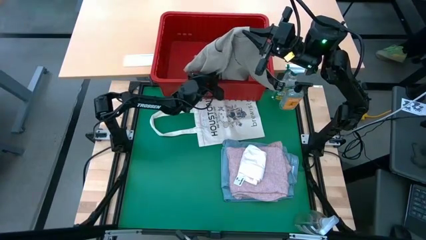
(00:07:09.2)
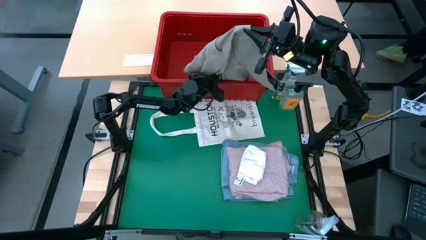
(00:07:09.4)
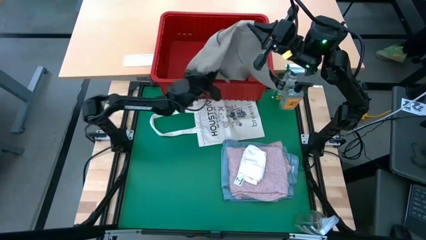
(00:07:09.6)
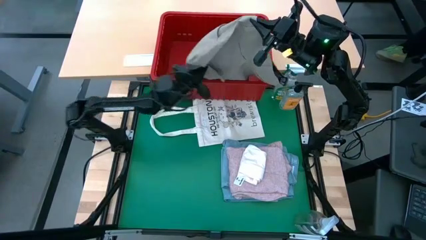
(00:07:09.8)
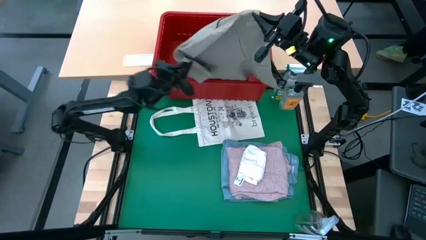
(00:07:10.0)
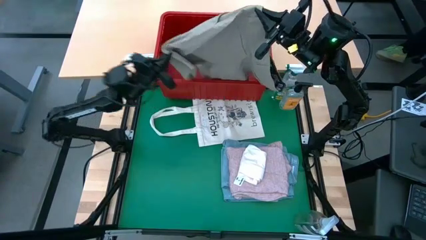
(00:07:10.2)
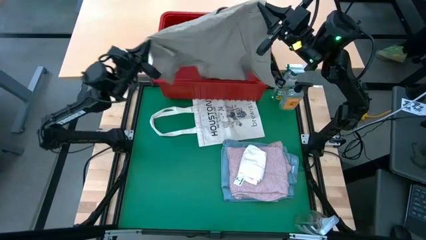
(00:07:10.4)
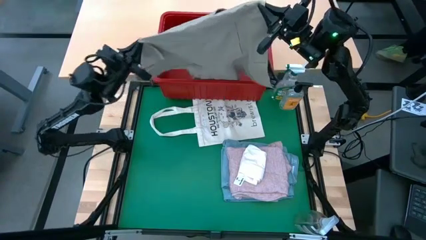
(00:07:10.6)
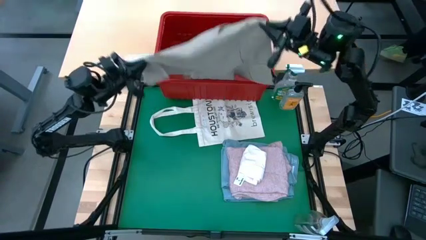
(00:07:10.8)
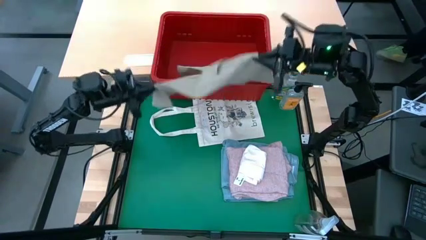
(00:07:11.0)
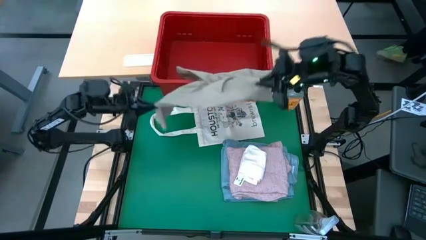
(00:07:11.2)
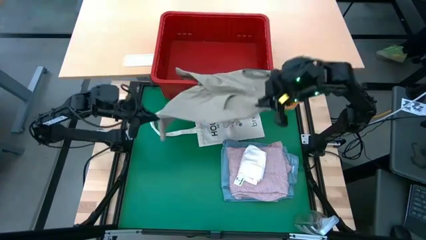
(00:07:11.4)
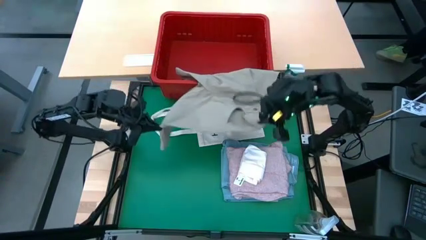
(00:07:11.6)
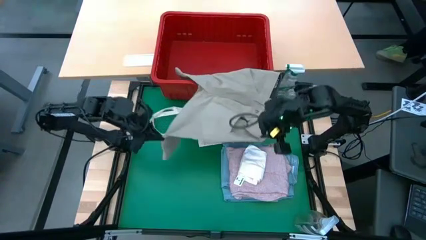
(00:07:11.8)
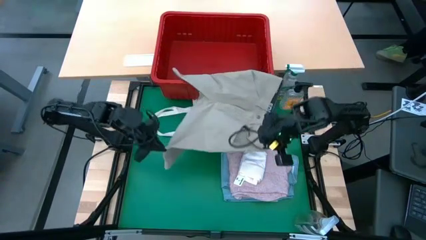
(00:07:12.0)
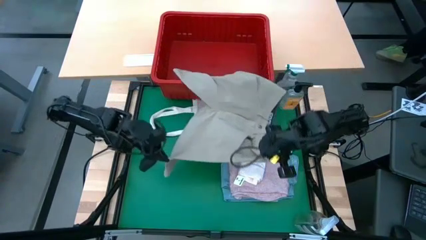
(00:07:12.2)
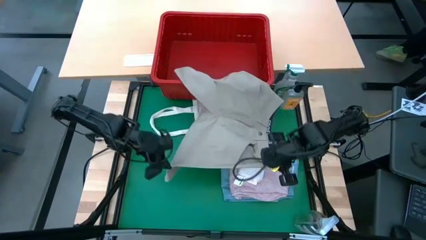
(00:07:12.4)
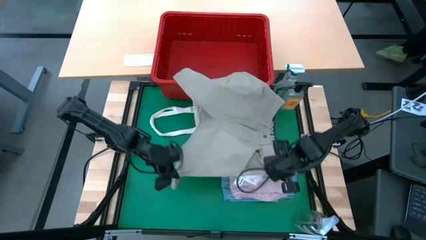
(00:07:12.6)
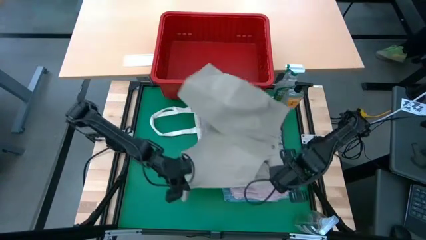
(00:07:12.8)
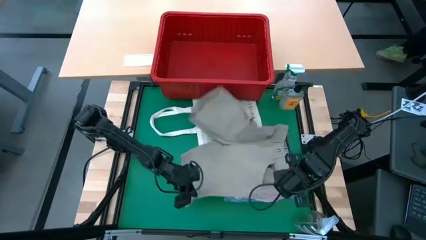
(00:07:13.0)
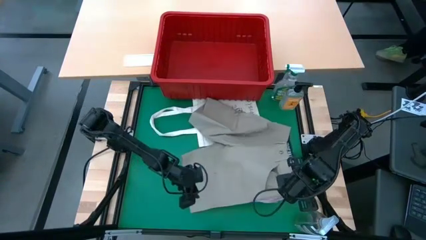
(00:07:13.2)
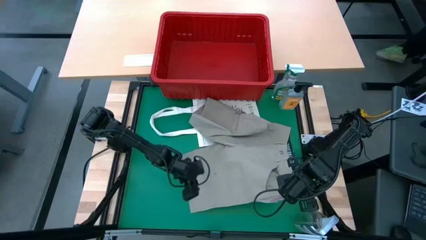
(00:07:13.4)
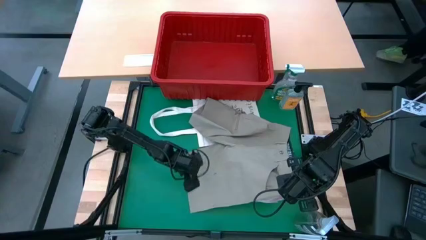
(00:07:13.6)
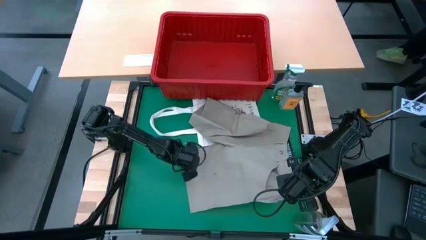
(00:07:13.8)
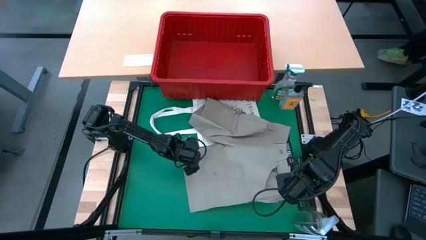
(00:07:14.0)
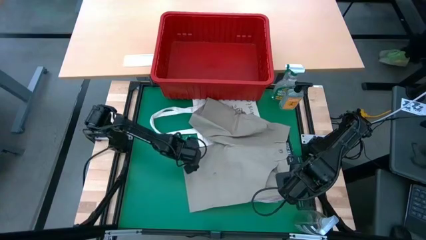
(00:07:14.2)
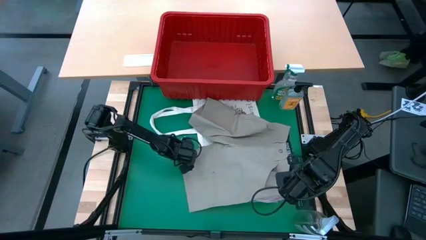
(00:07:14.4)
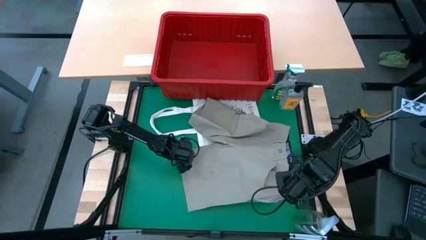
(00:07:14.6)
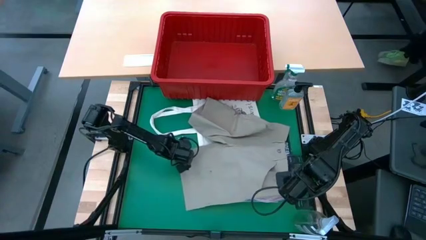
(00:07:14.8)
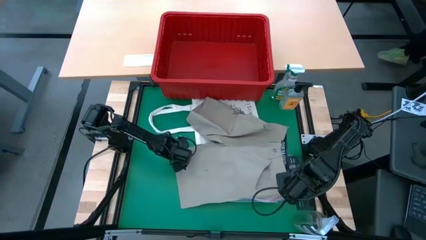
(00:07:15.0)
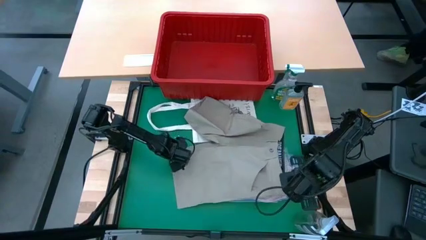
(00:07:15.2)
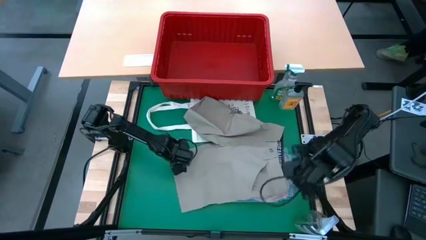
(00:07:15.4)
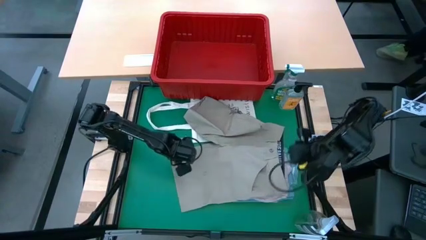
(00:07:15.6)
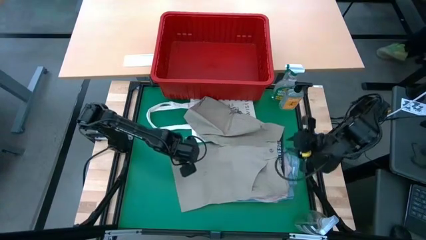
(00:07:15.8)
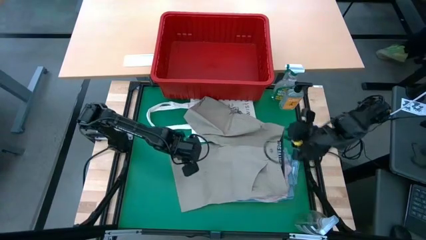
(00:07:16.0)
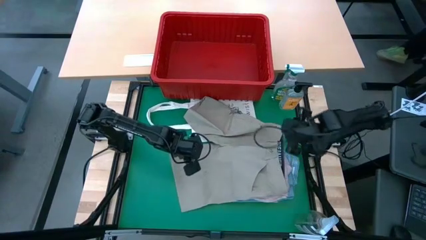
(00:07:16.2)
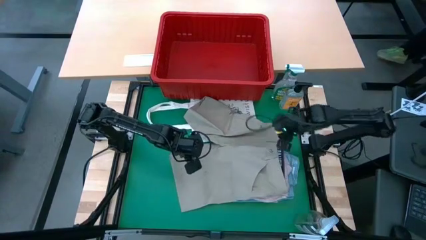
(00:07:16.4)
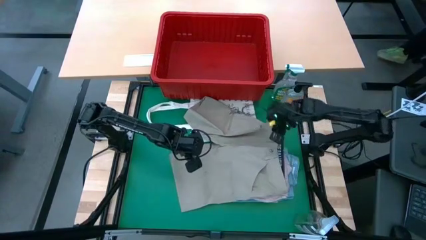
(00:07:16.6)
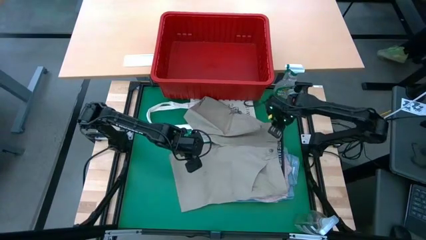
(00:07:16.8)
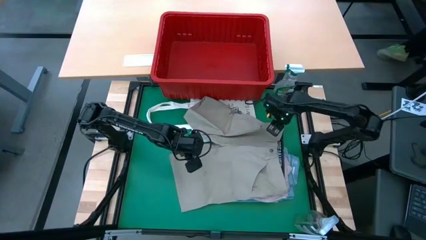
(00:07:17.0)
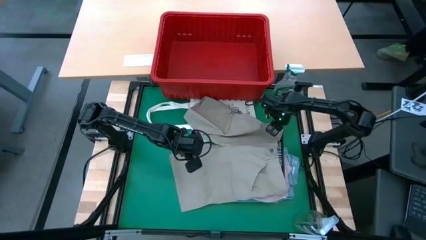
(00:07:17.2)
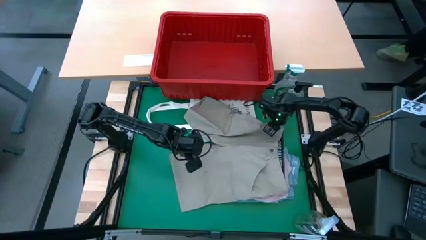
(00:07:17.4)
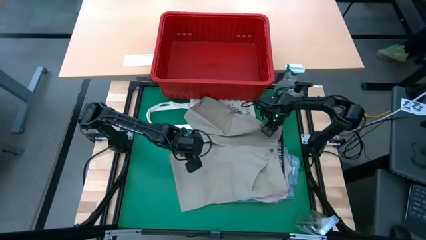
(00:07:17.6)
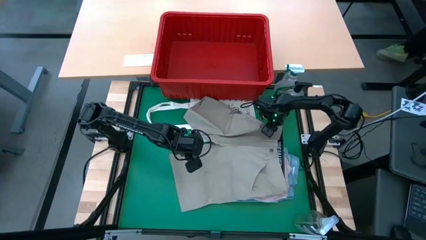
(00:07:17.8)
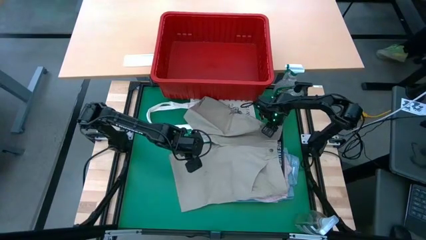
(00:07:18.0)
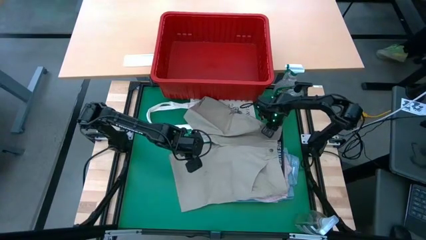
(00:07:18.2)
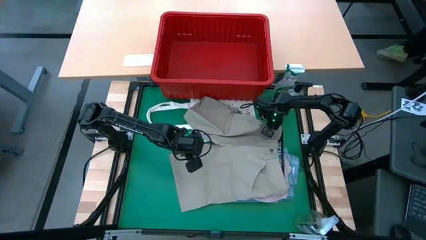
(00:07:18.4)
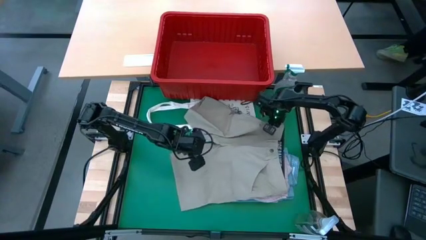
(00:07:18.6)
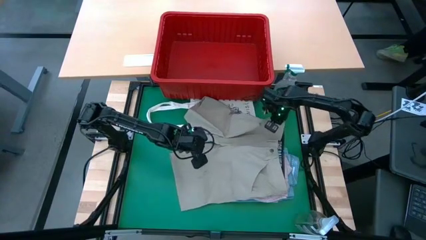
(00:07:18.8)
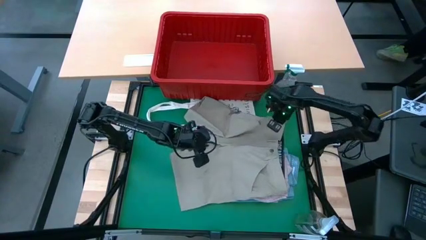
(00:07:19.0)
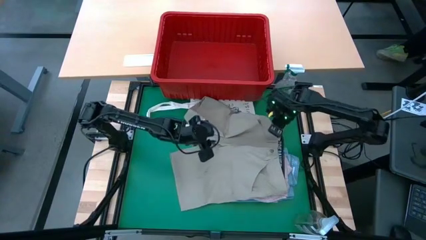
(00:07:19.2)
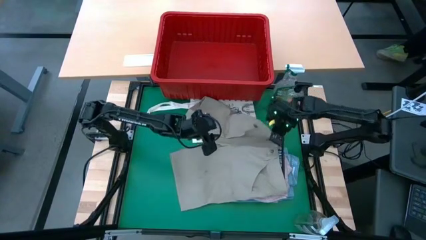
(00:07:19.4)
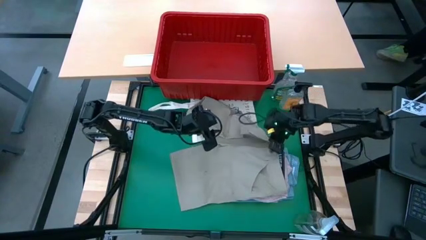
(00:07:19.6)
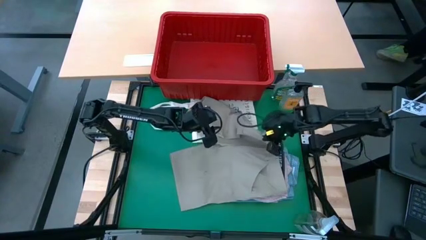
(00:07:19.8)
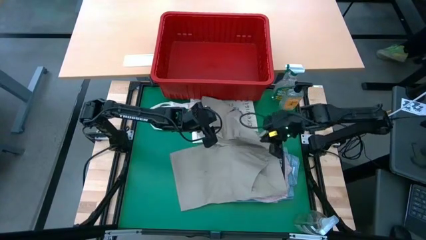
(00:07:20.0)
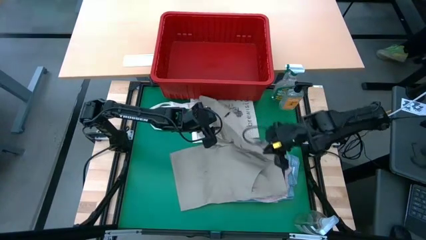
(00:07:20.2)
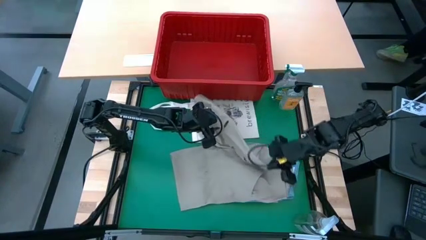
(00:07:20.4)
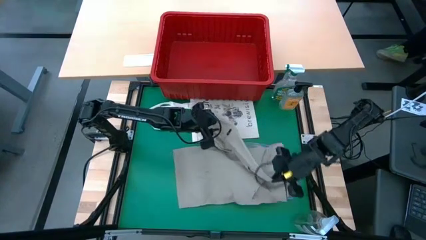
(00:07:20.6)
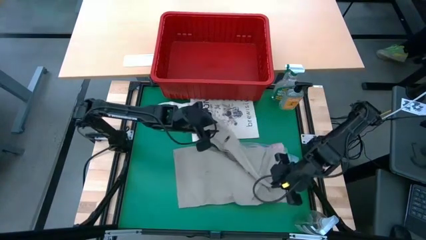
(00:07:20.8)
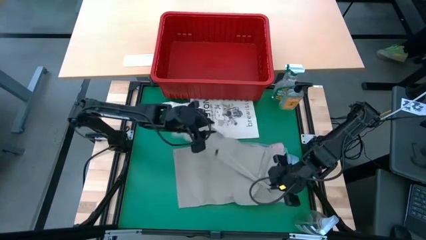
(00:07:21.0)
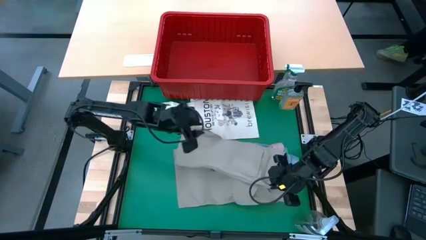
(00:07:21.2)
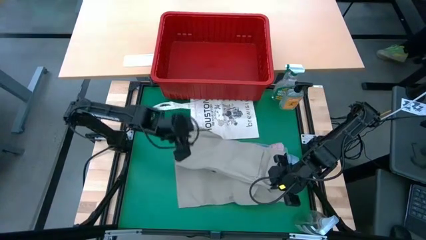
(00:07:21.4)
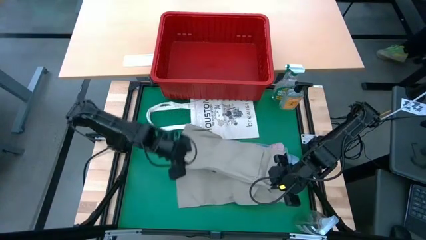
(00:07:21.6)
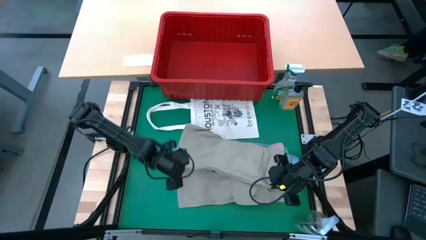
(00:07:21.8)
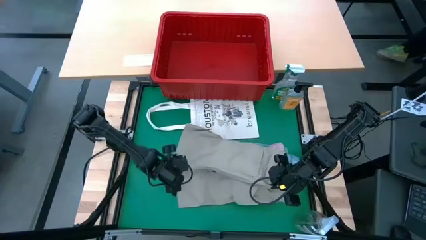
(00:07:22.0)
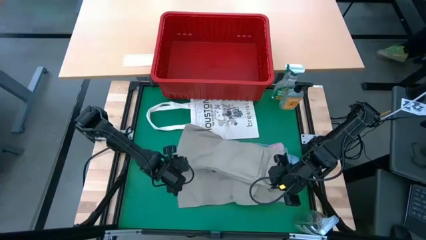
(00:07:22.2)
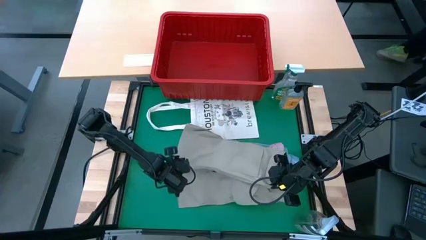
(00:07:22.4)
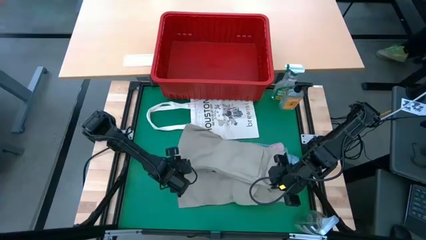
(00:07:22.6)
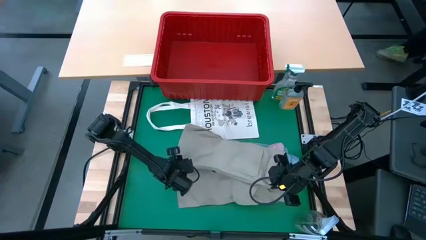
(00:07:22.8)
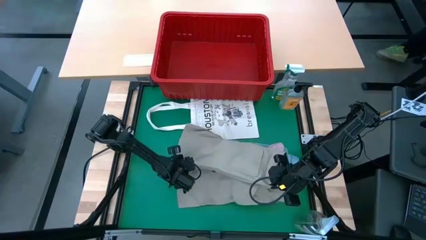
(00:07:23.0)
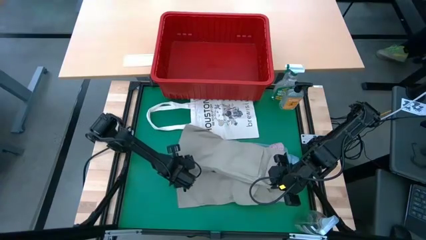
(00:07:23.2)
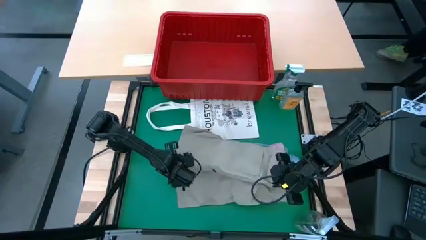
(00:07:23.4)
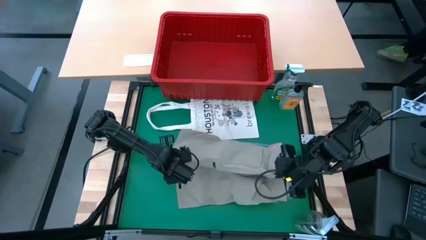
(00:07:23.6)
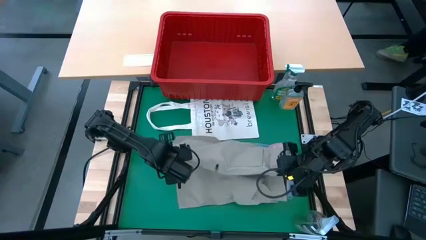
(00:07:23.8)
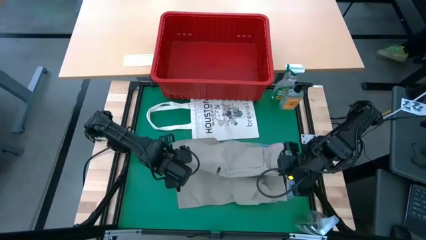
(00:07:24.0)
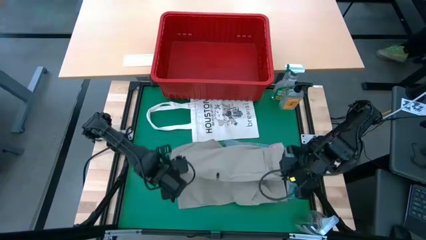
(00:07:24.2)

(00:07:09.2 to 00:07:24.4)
Task: Fold Laundry from Bin
Fold the light brown shorts from the red laundry basket
